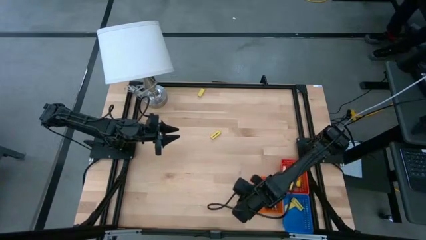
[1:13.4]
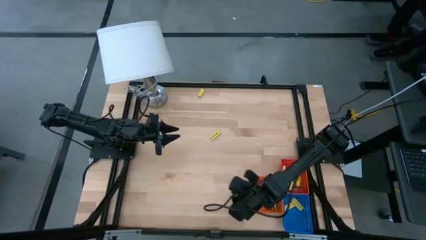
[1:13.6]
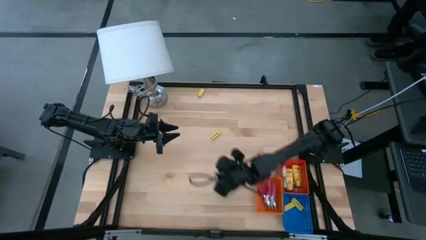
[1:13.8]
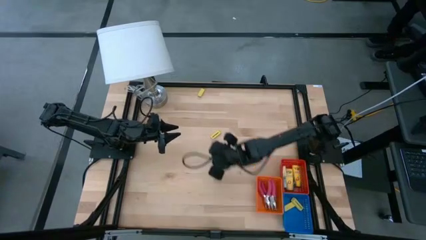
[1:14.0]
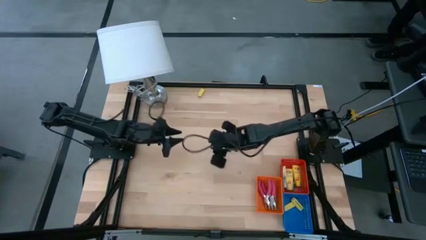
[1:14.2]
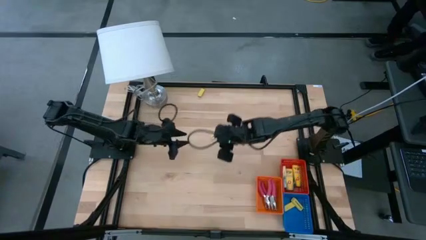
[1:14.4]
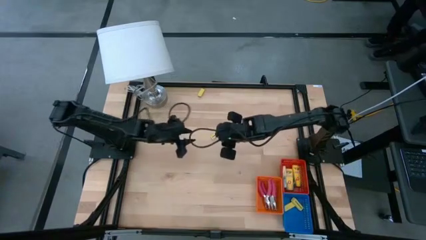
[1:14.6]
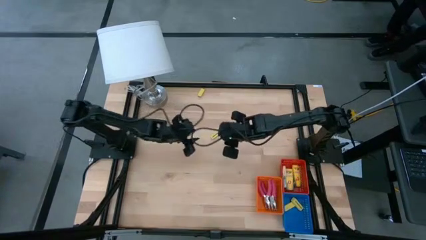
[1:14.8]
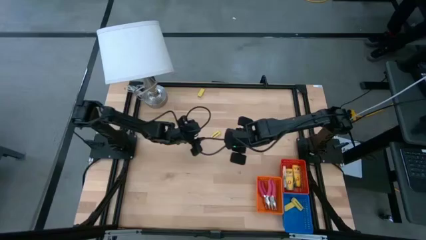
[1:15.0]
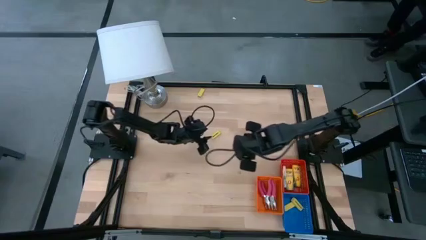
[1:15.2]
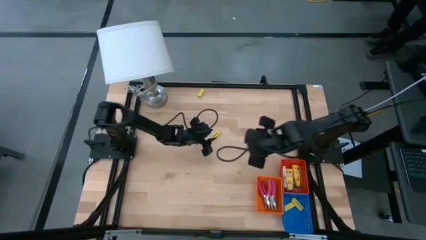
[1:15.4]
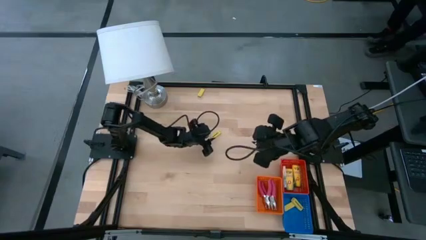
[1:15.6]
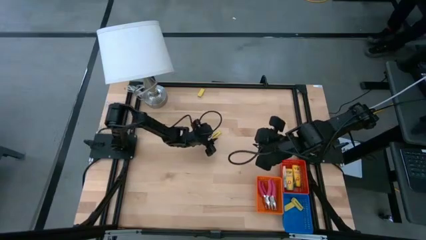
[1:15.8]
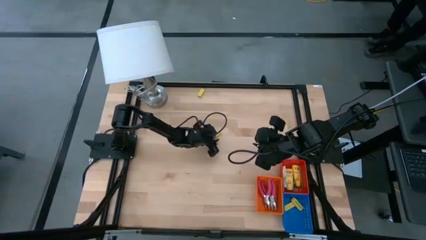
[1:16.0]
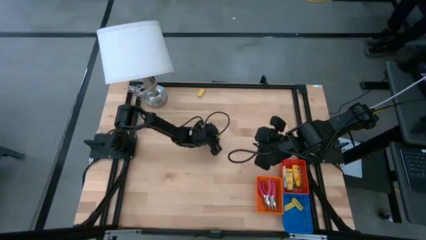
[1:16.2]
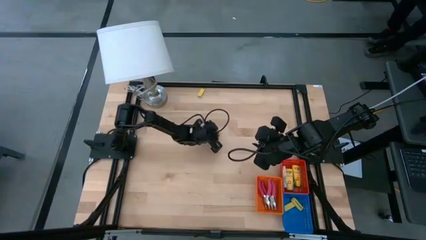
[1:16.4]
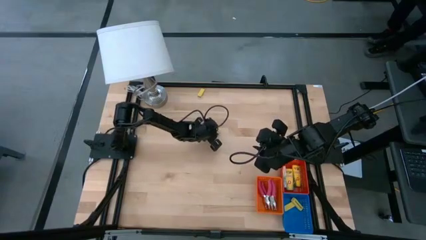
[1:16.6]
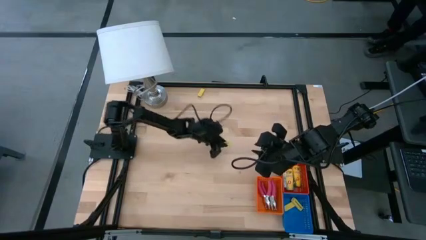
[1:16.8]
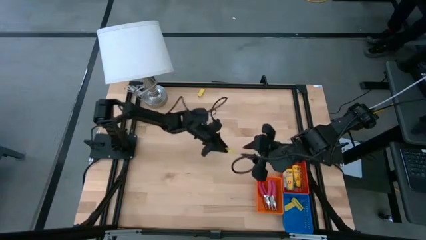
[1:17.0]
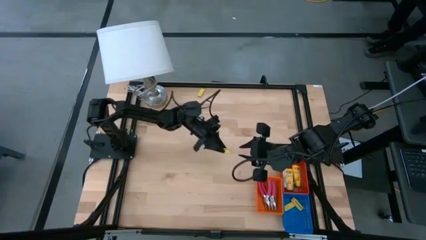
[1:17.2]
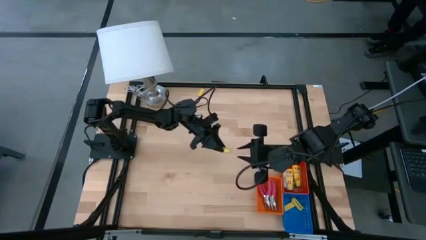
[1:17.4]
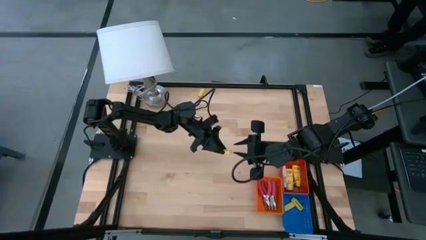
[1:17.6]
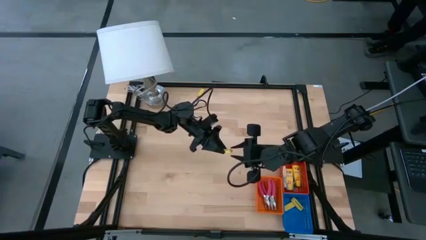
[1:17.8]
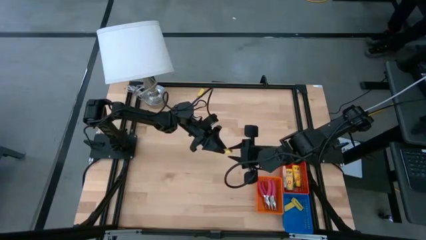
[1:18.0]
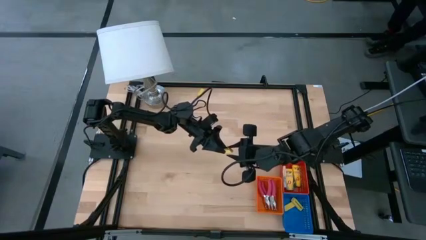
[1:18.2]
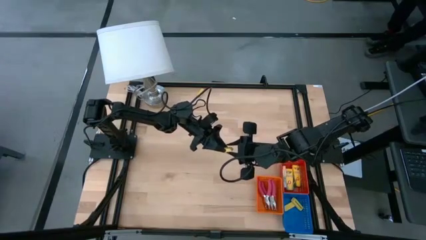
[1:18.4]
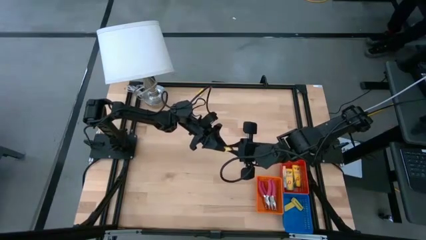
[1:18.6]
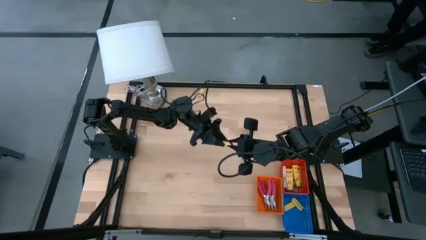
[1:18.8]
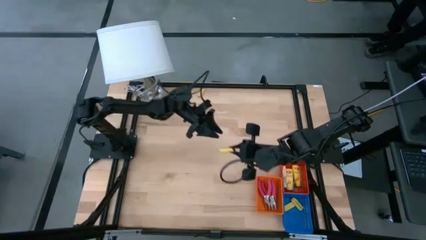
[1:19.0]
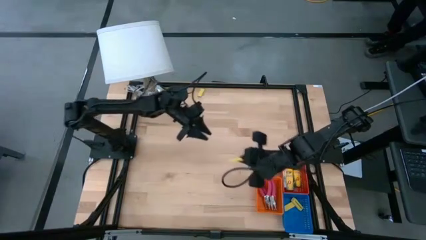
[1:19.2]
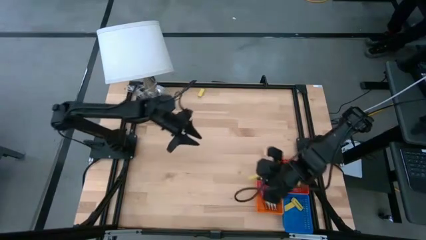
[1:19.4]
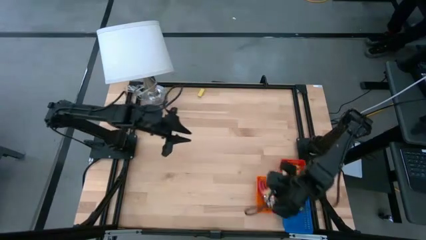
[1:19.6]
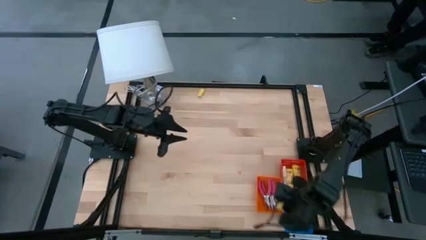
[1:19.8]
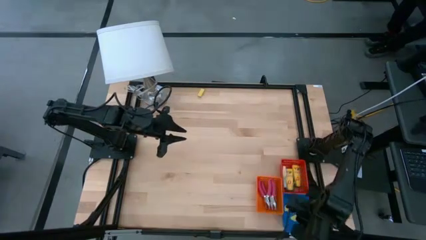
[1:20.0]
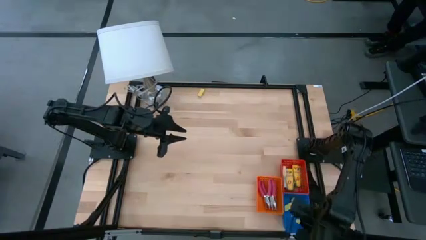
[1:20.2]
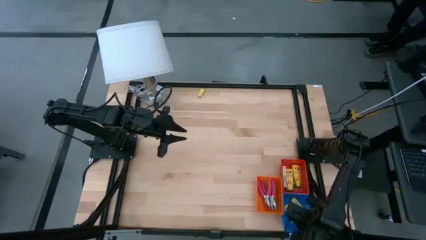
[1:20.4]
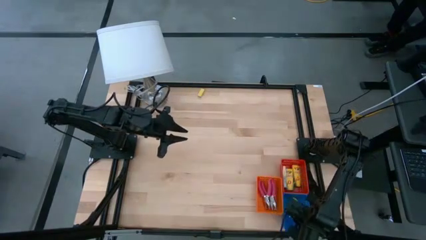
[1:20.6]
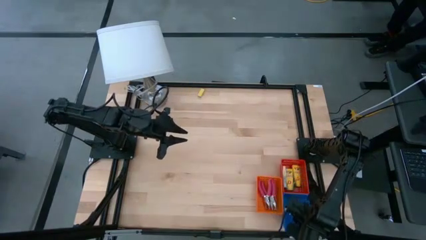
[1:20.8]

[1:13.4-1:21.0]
Task: Pick & Place School Supplies
Put the yellow eraser into the blue basket

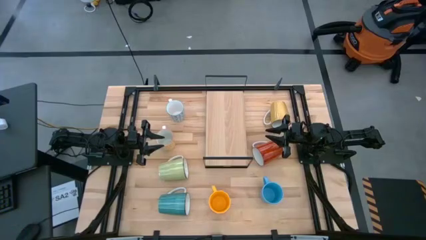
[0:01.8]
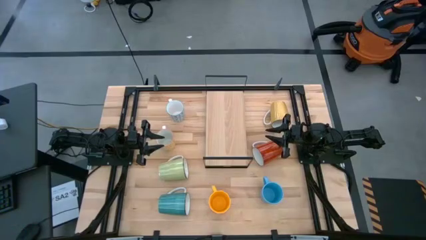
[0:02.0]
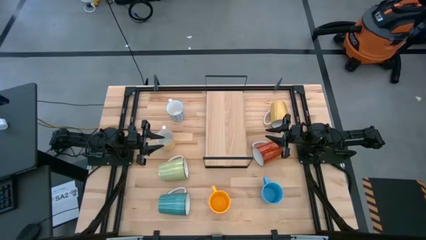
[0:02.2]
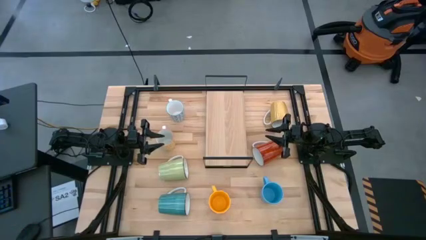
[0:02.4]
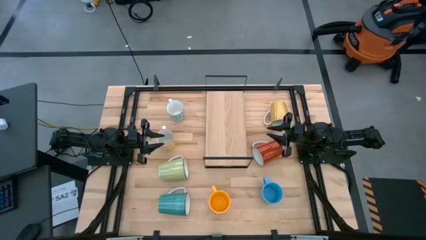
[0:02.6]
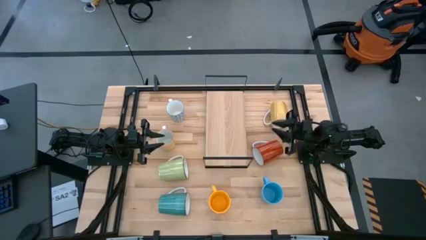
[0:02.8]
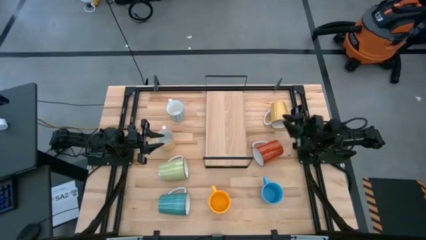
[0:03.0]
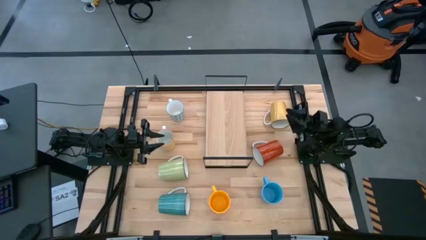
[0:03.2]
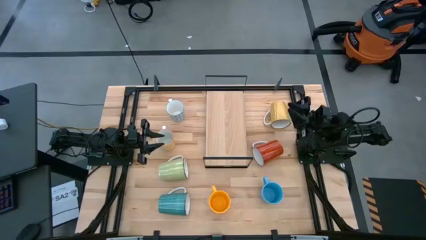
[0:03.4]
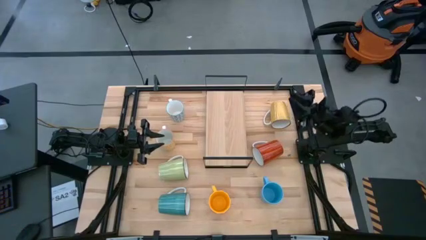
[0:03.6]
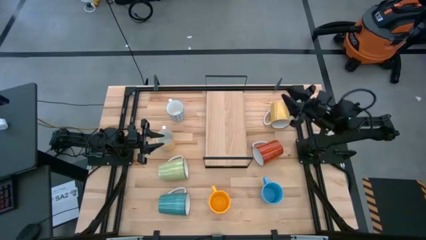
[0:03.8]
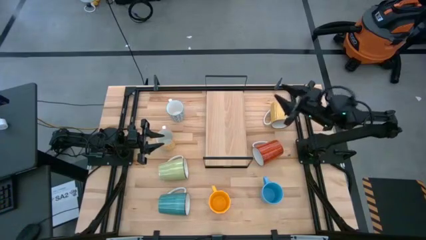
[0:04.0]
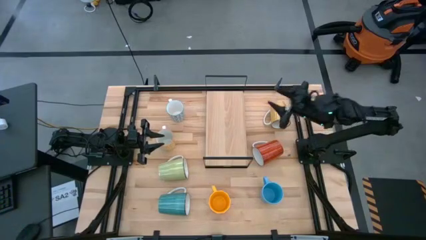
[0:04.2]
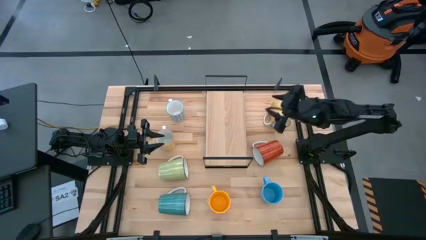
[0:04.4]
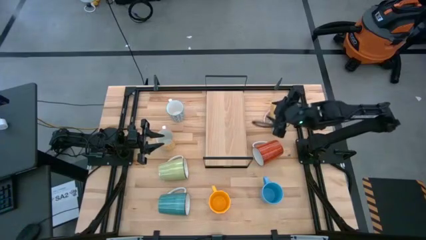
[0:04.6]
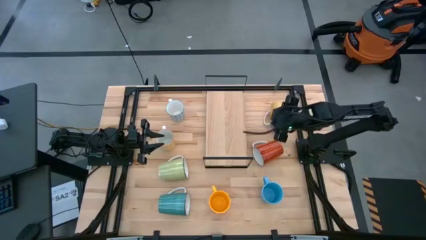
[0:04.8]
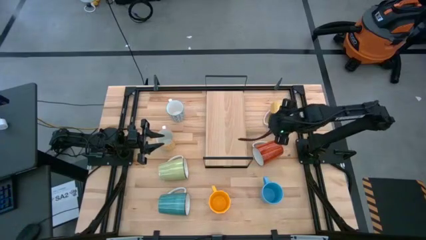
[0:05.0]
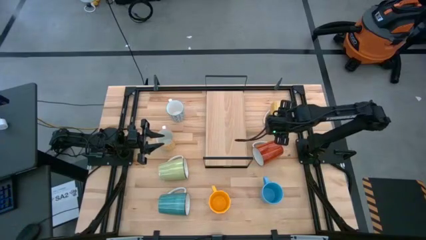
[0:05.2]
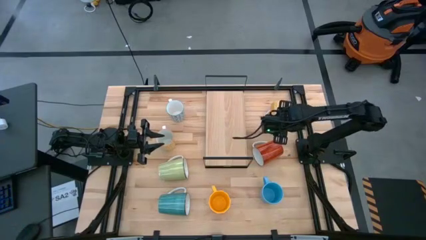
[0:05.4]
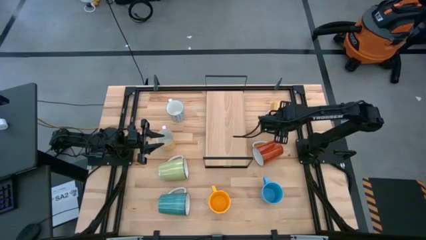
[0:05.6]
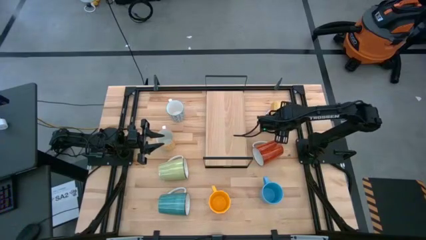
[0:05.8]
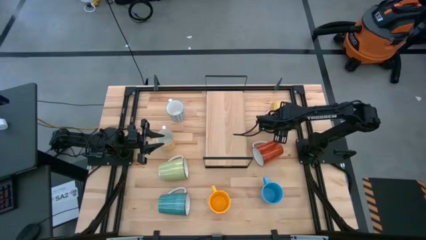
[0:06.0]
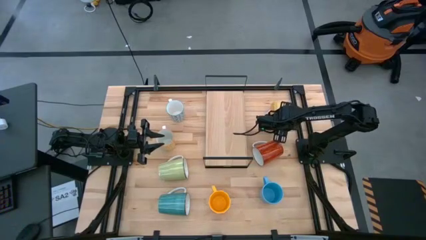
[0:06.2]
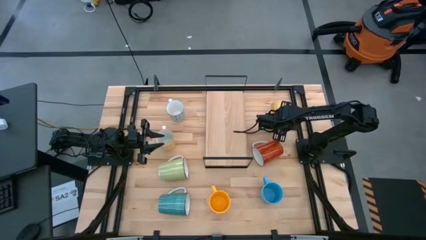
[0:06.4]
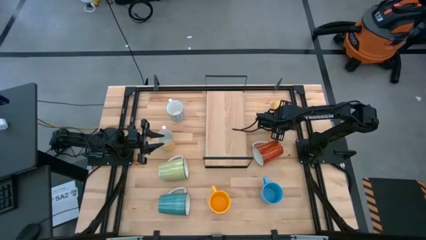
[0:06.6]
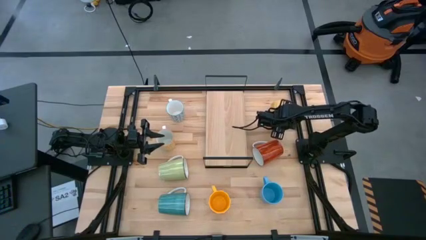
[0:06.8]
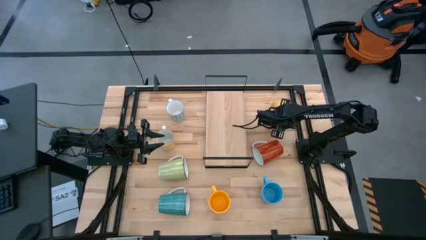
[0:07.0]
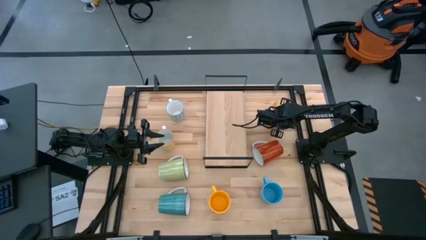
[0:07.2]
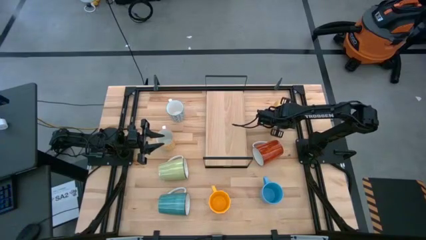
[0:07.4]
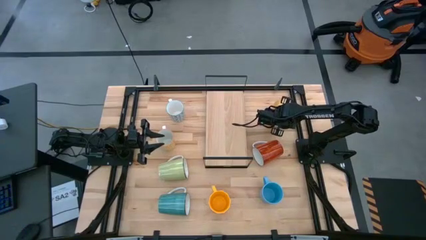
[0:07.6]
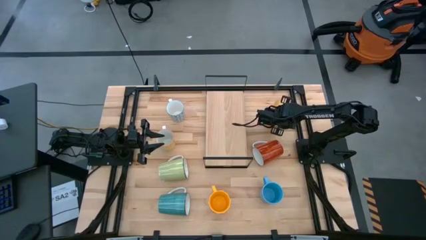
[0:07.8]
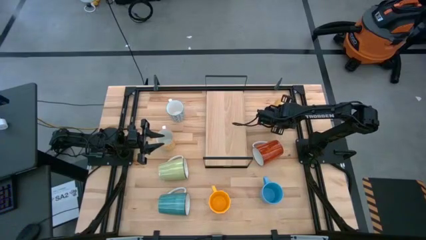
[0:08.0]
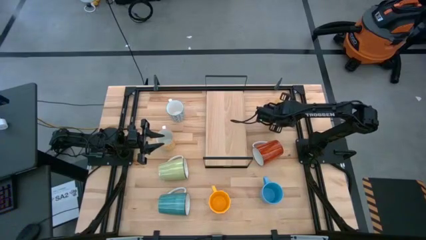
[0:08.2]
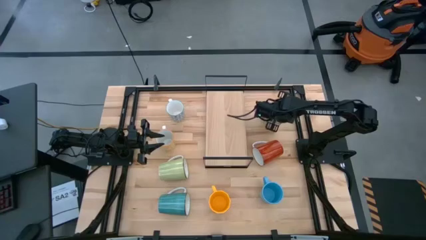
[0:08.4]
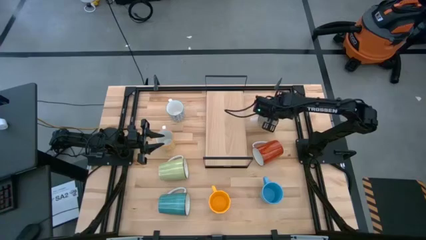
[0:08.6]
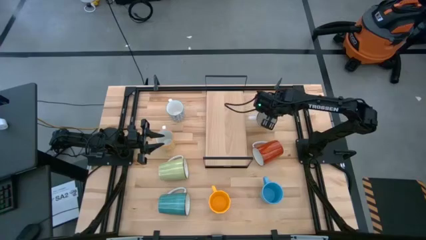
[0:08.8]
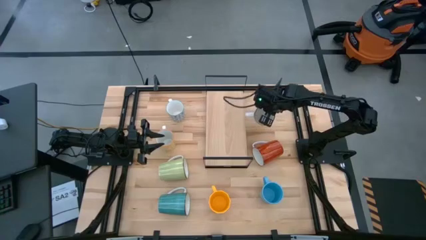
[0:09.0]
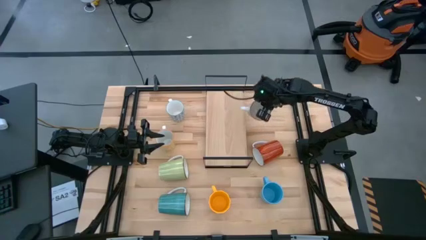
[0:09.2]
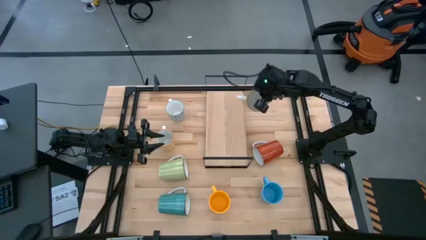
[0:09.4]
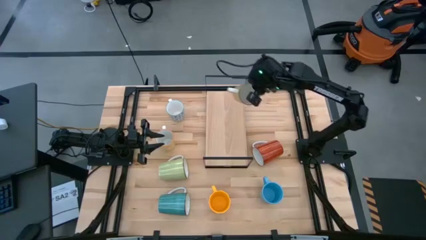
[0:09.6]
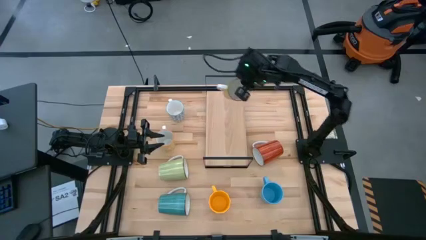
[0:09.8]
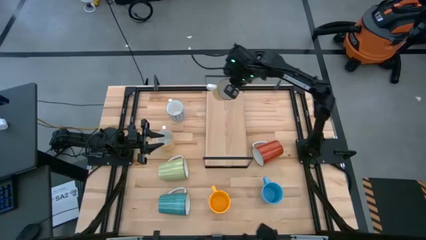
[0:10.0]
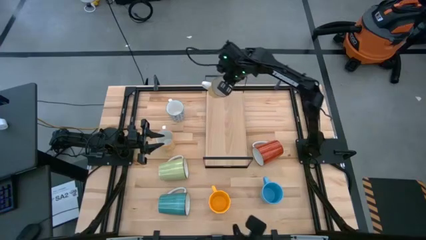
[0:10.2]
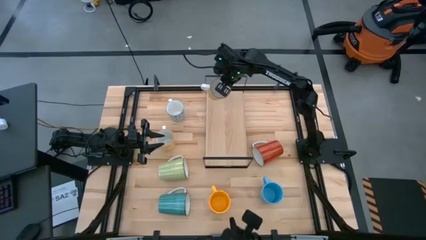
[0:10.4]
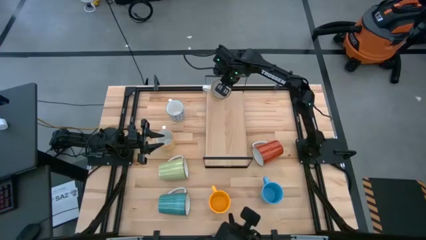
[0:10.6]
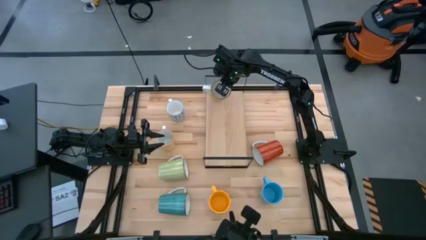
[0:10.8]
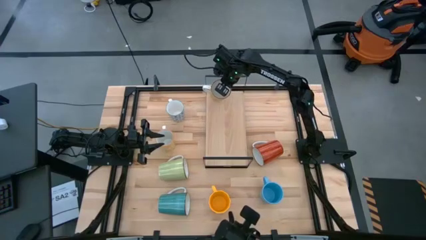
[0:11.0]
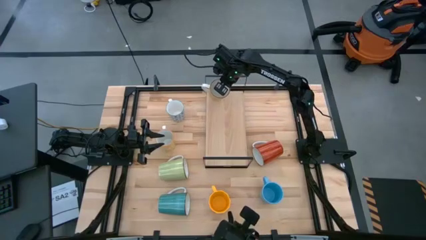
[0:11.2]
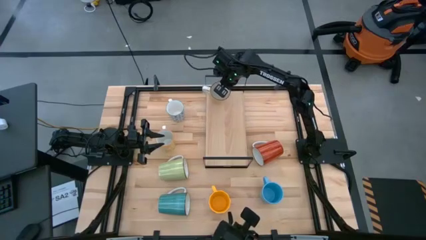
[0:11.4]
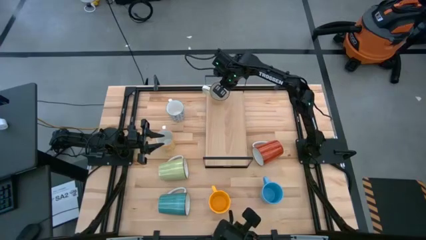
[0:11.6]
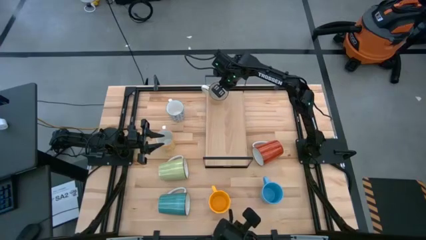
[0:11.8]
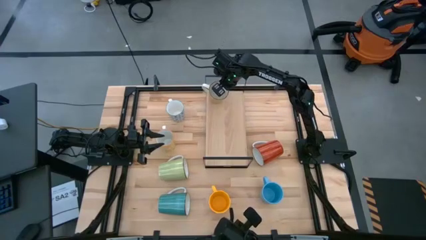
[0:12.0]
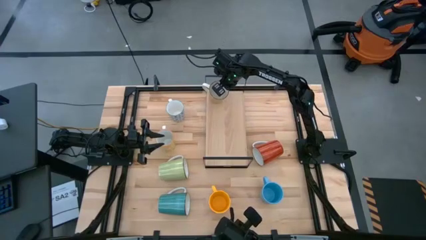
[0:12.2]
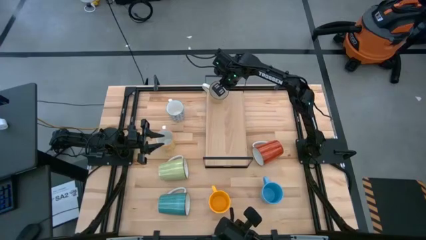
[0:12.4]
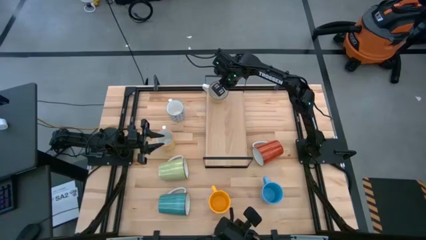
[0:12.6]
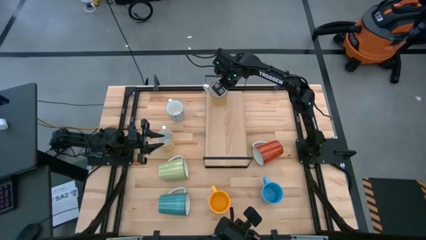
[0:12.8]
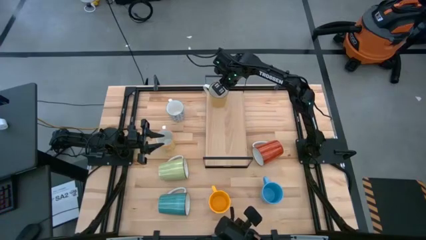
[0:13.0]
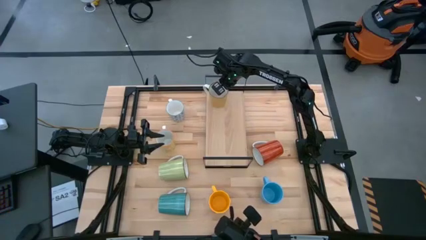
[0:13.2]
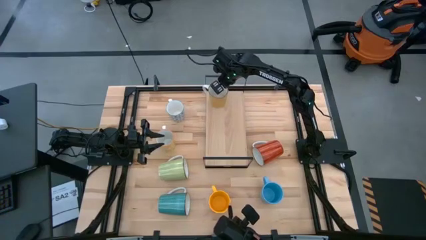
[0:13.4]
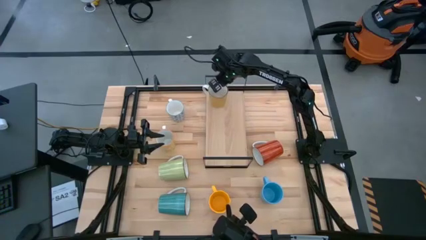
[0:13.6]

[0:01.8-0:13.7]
Task: Place coffee mugs
Put the light yellow mug on the shelf
